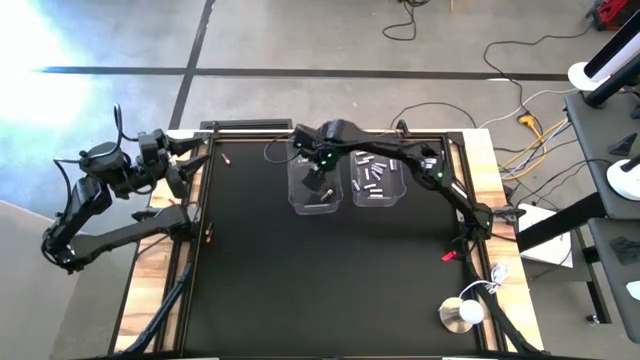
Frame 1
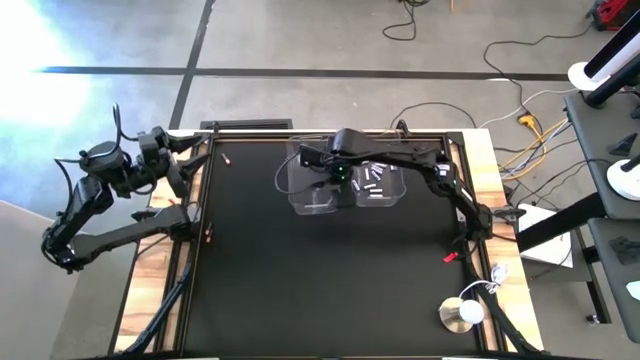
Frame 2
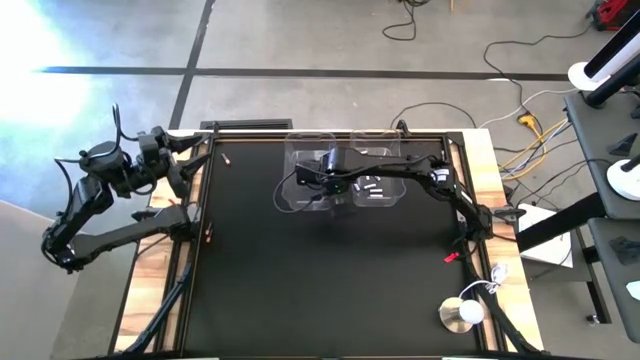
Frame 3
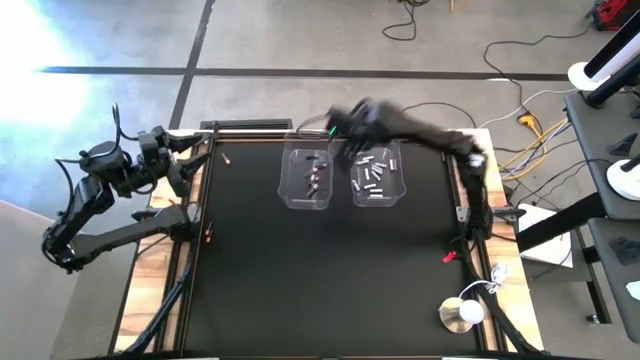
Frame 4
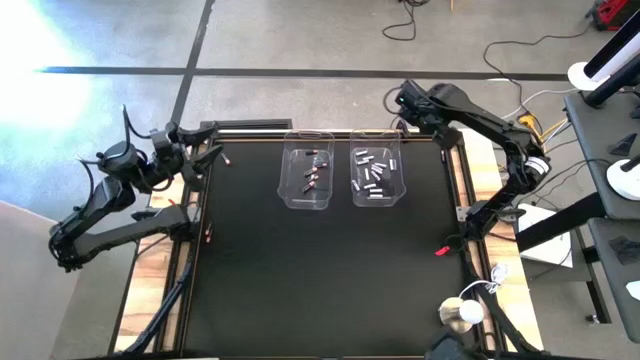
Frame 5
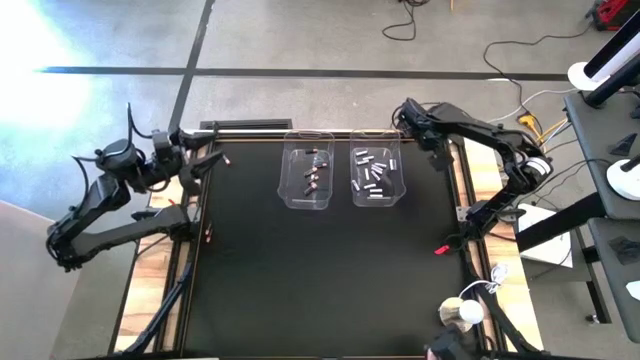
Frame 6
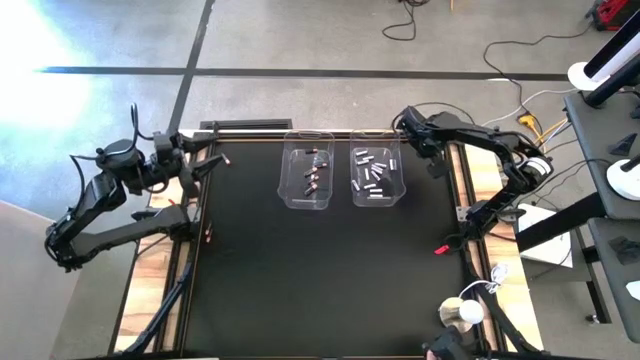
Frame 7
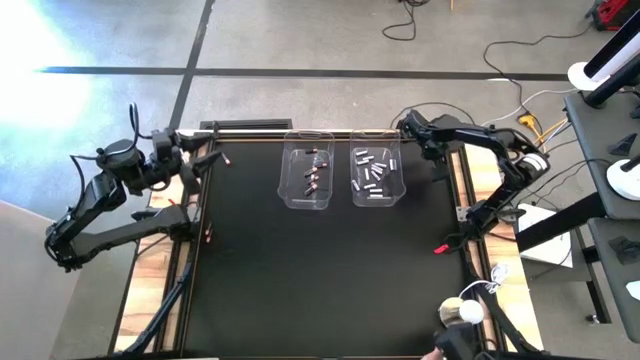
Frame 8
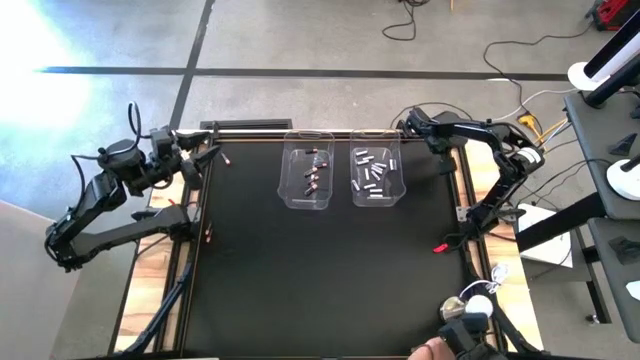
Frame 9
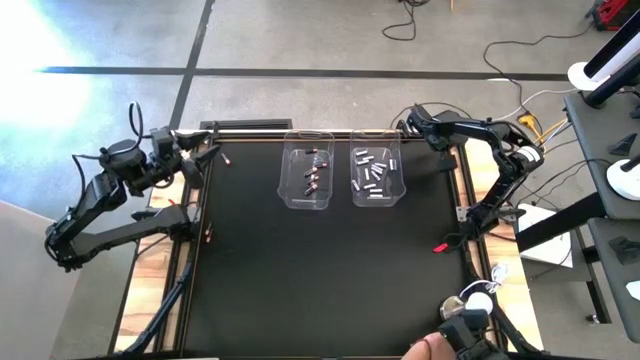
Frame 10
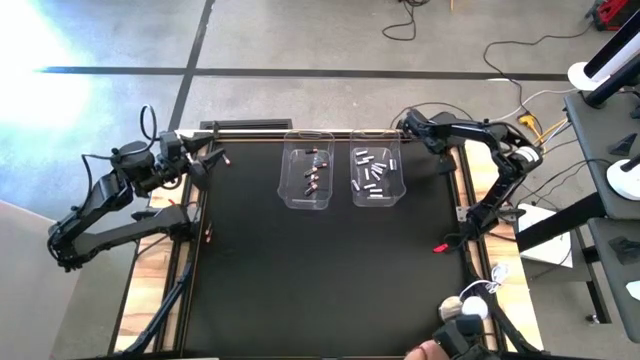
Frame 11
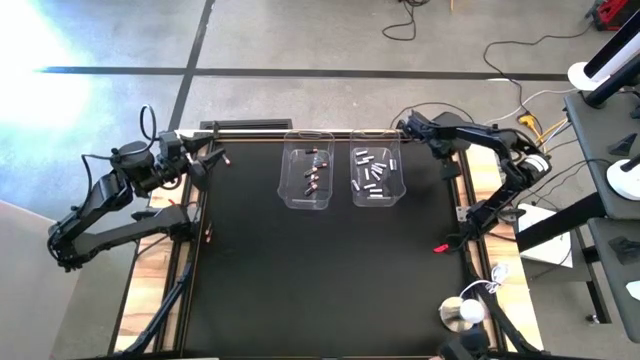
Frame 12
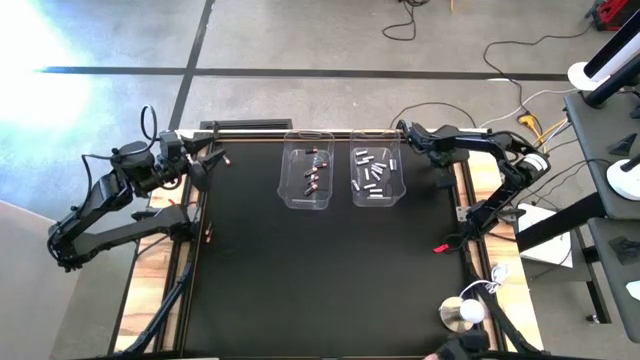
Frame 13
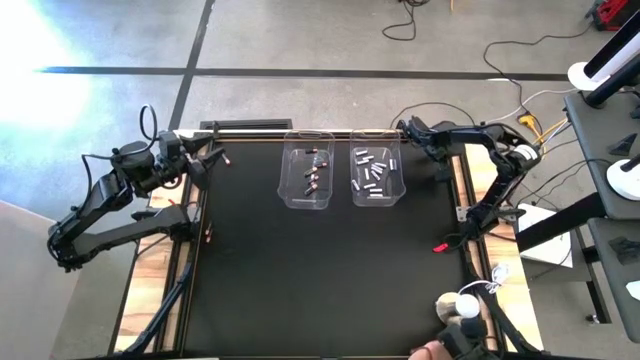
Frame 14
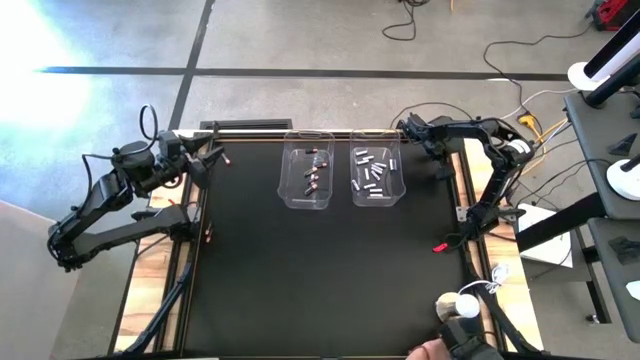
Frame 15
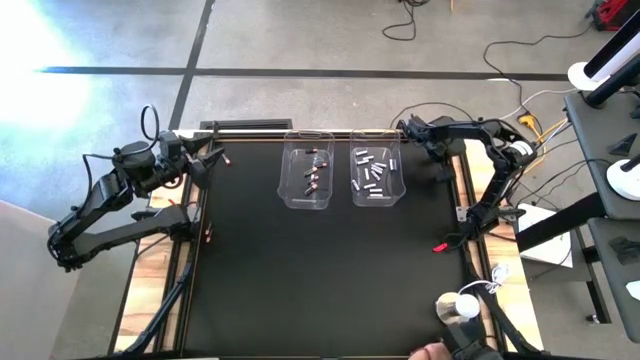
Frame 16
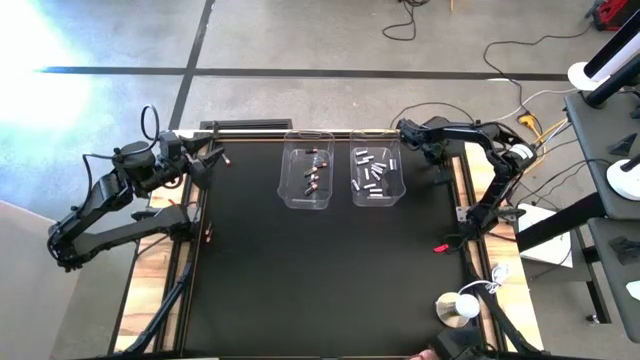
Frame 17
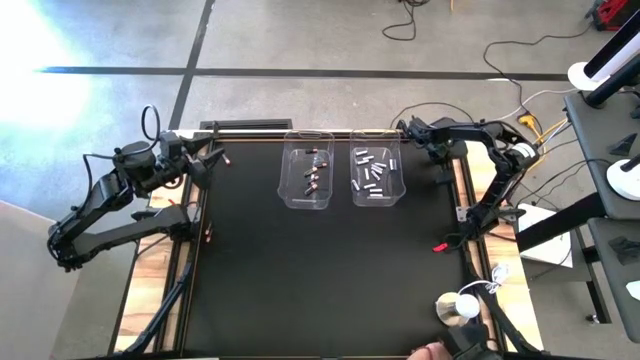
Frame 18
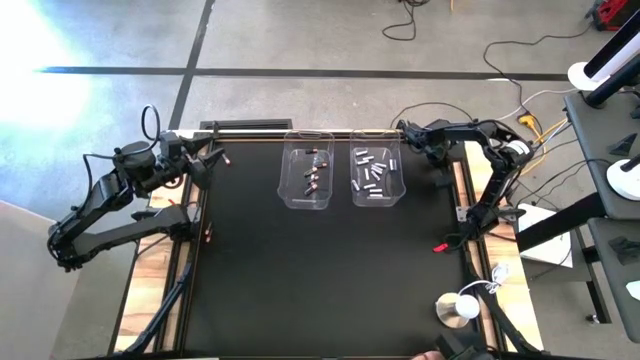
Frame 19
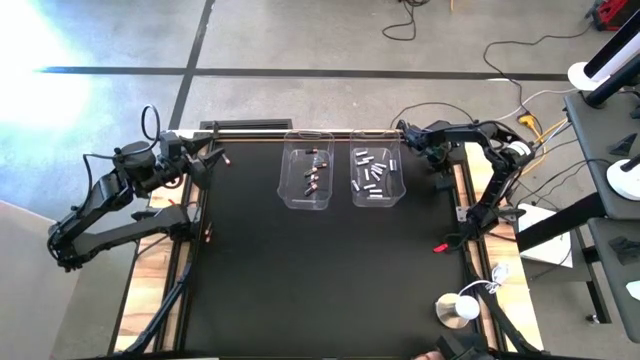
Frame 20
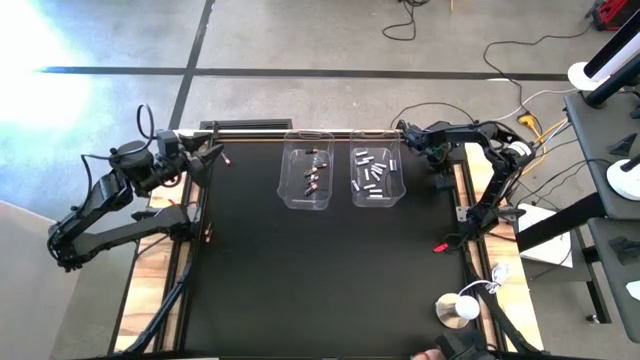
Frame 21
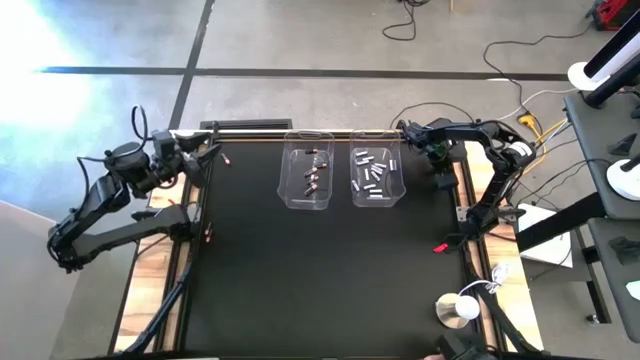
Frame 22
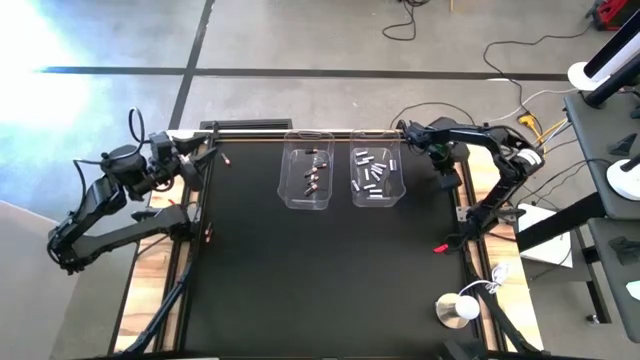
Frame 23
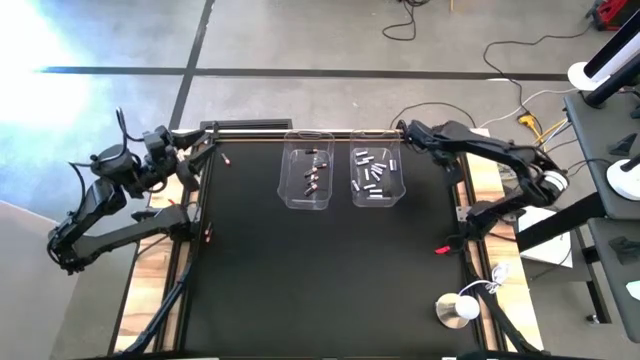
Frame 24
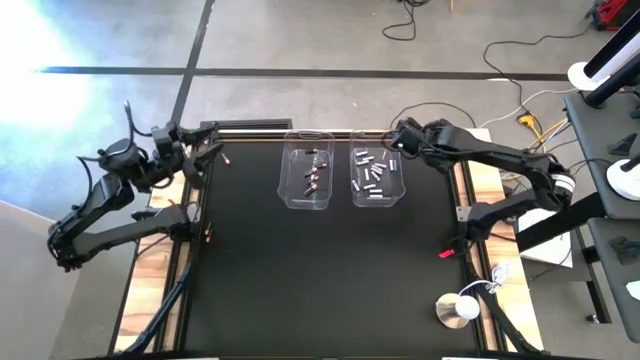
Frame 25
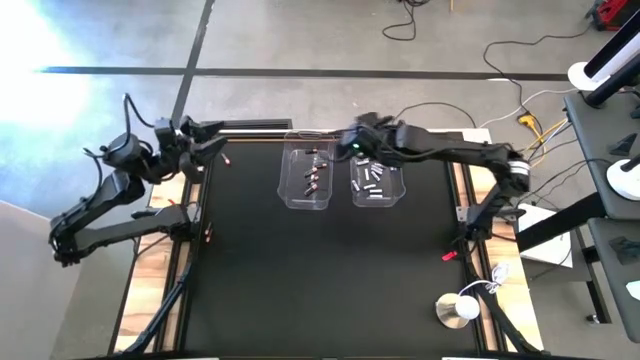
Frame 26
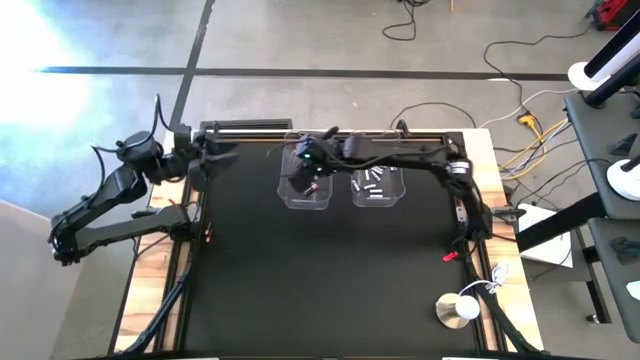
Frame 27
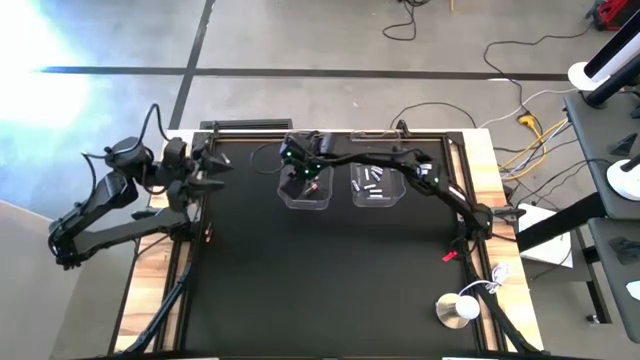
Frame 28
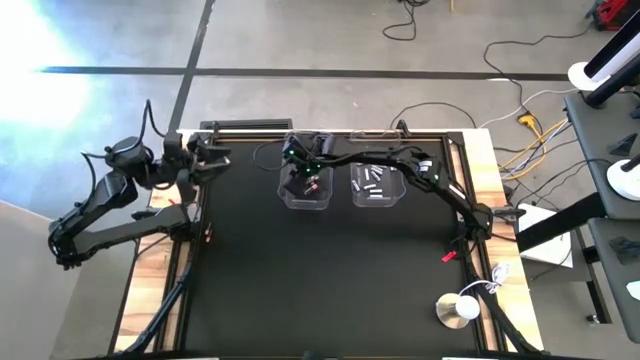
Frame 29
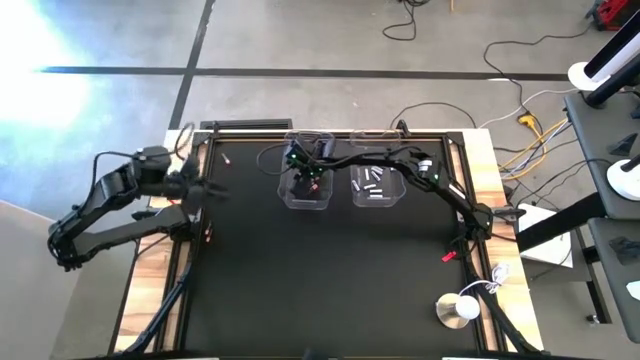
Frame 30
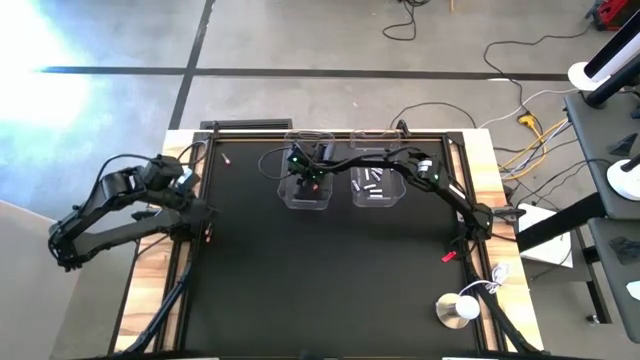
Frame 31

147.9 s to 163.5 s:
Task: Sort batteries
Put the black battery into the left transparent bin

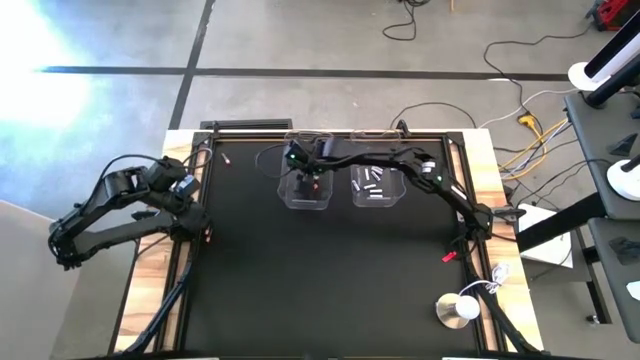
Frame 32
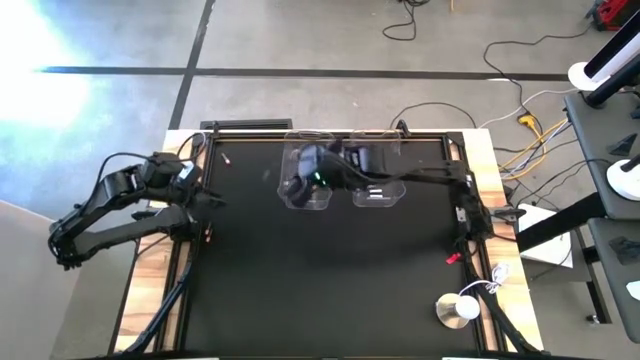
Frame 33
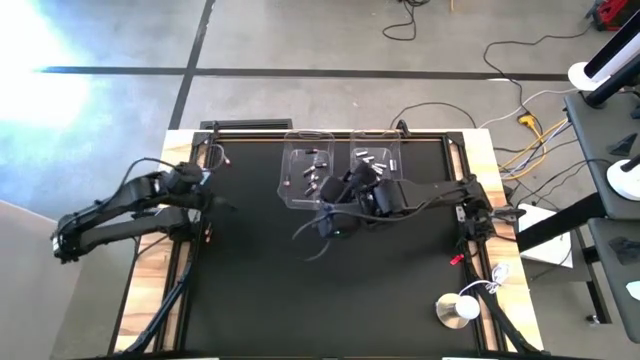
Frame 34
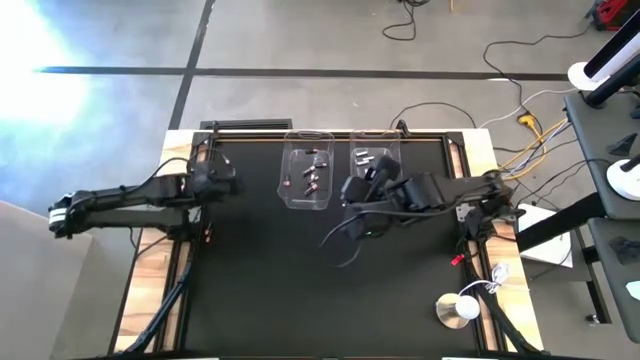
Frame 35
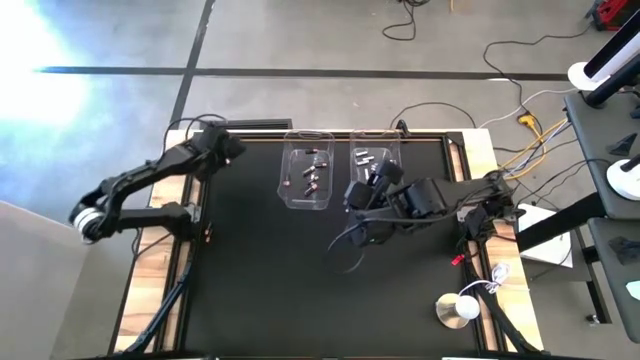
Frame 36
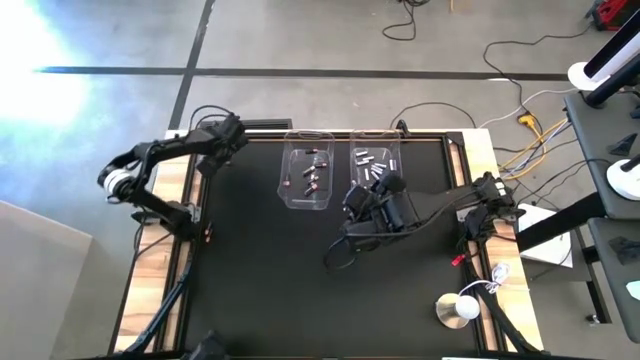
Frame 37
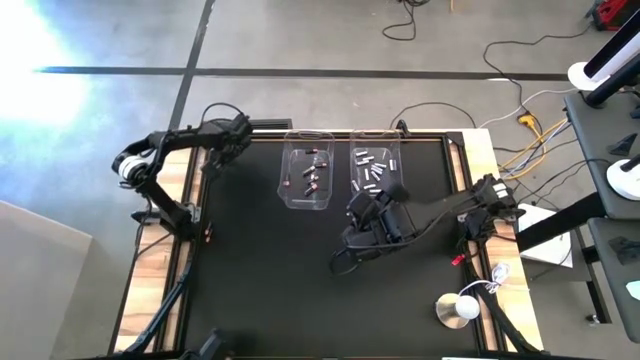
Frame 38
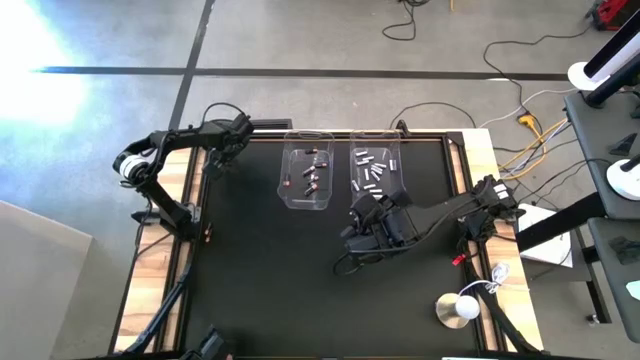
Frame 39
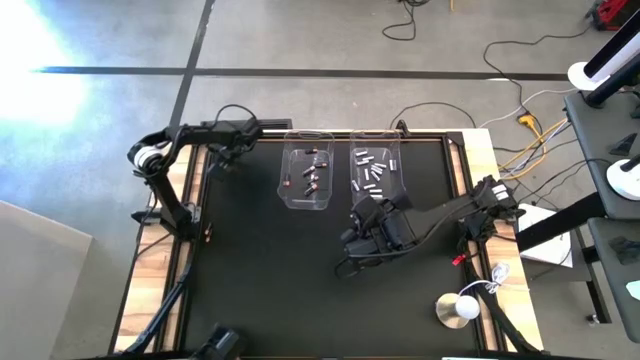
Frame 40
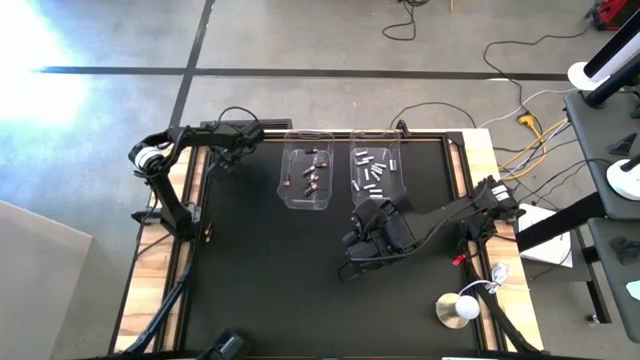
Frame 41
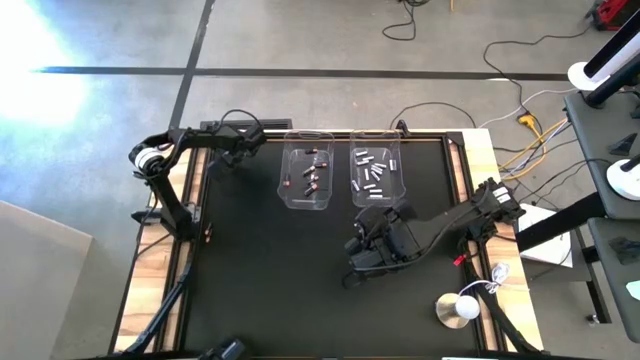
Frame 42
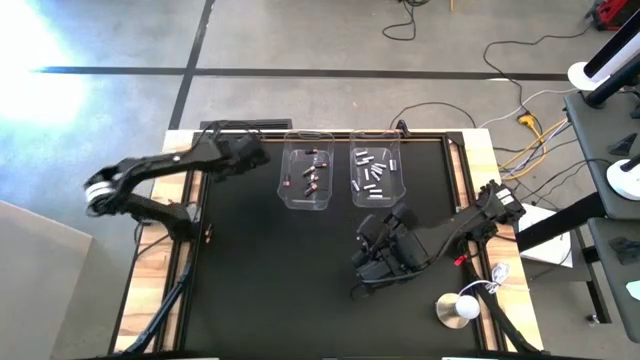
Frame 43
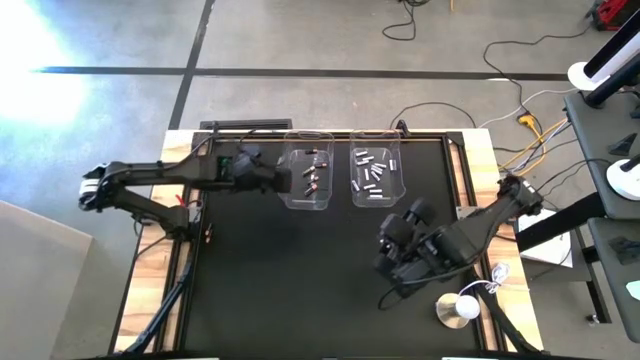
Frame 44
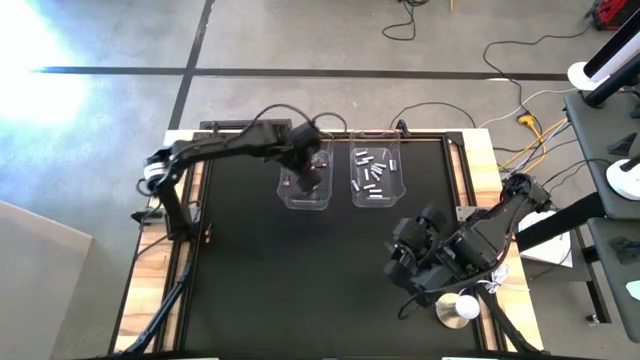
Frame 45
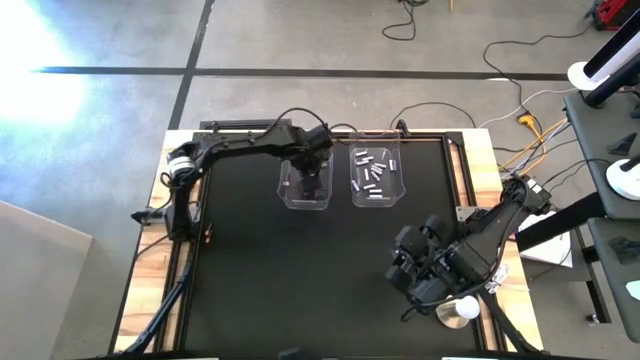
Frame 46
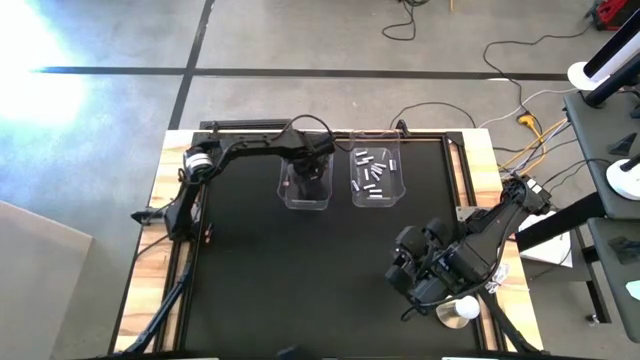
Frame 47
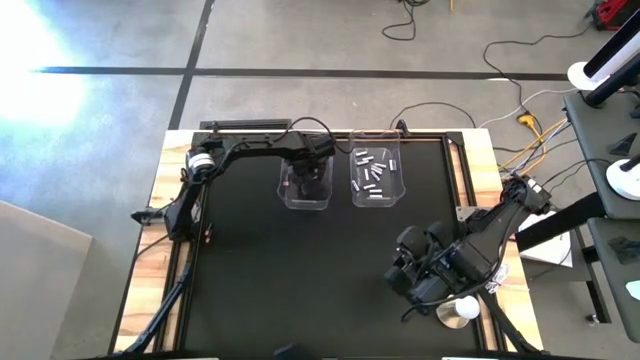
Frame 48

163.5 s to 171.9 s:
Put the black battery into the left transparent bin
